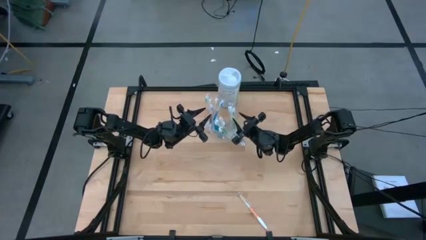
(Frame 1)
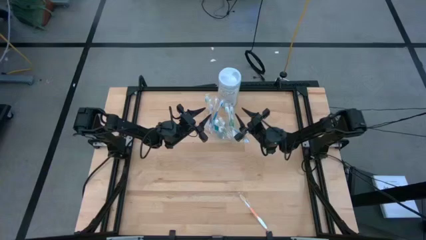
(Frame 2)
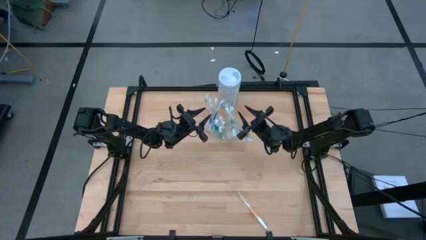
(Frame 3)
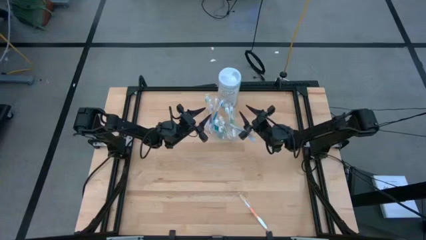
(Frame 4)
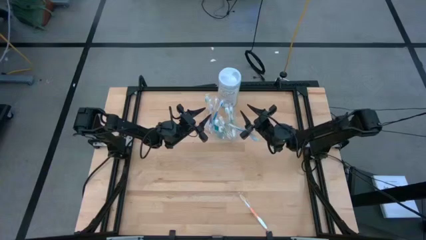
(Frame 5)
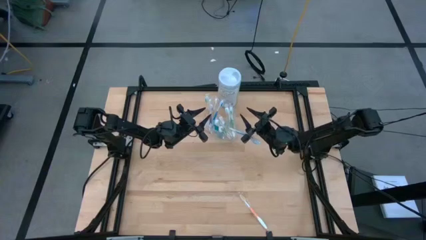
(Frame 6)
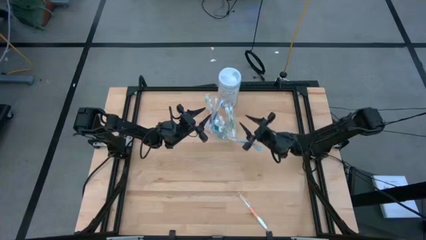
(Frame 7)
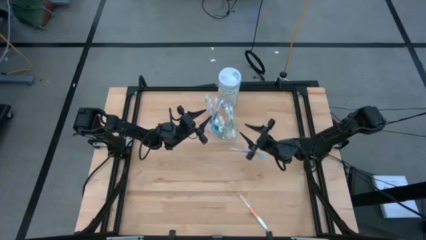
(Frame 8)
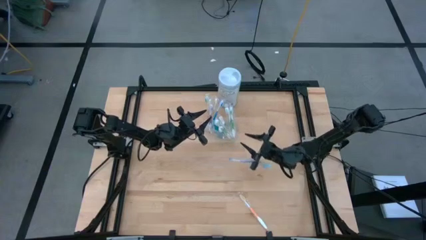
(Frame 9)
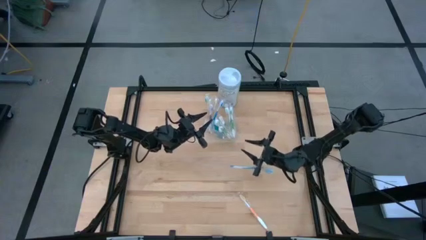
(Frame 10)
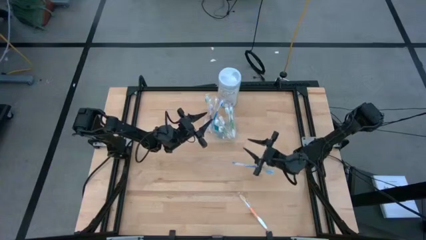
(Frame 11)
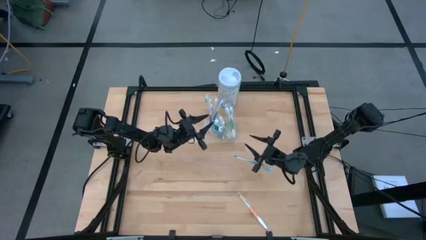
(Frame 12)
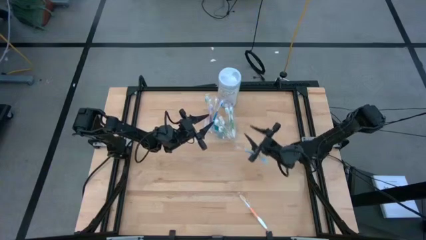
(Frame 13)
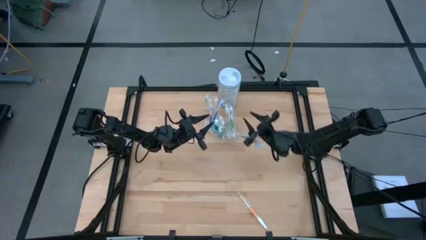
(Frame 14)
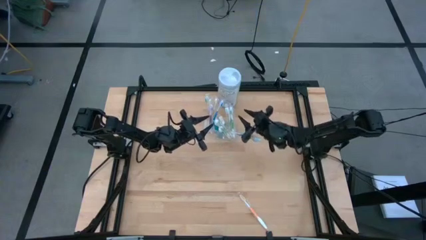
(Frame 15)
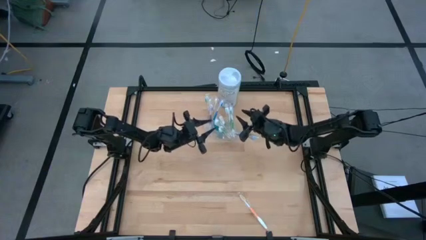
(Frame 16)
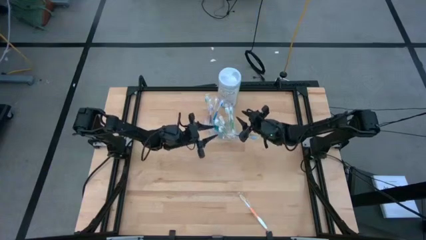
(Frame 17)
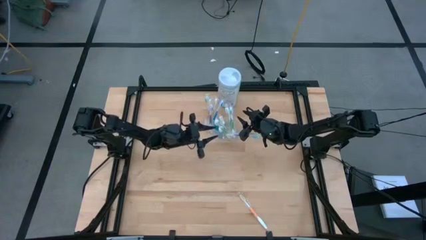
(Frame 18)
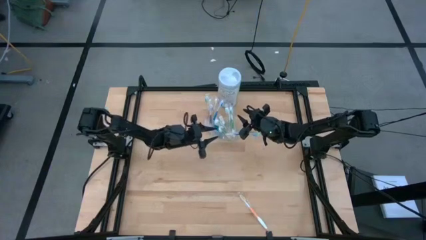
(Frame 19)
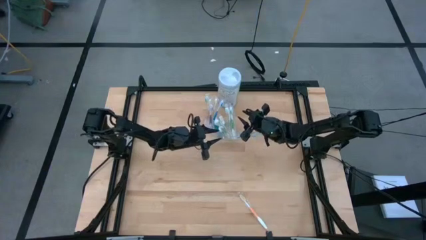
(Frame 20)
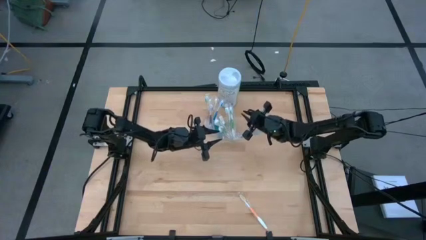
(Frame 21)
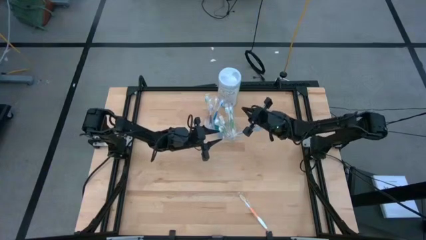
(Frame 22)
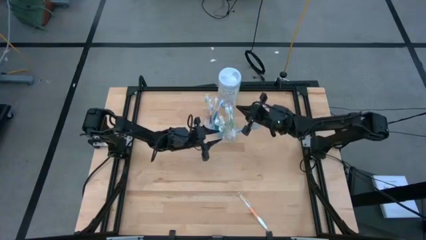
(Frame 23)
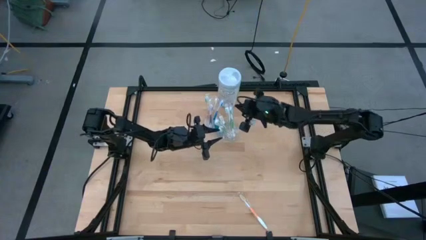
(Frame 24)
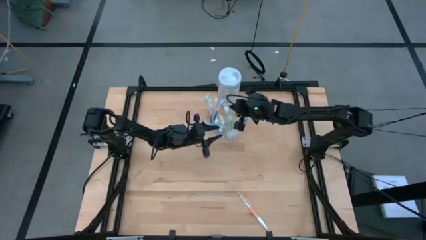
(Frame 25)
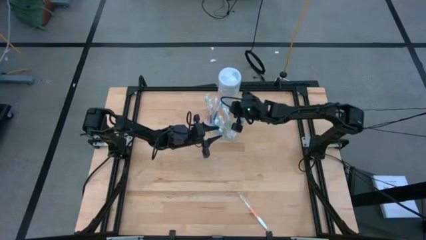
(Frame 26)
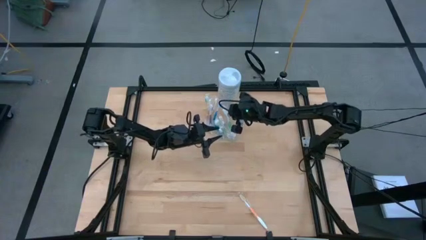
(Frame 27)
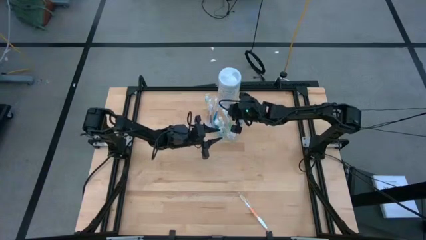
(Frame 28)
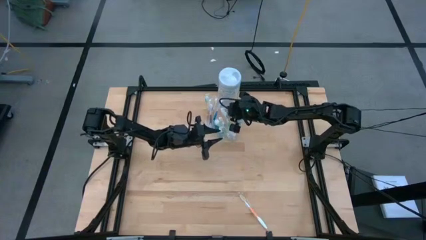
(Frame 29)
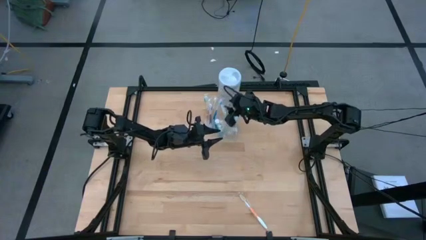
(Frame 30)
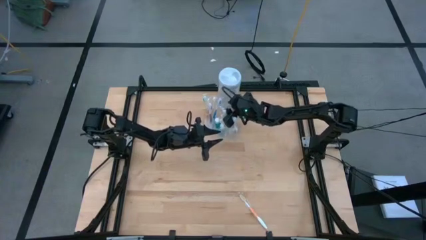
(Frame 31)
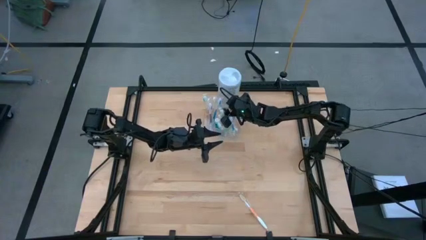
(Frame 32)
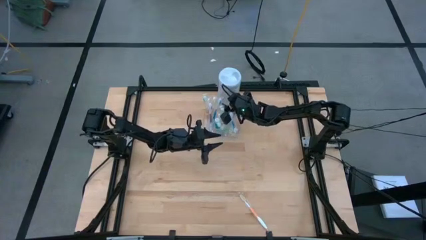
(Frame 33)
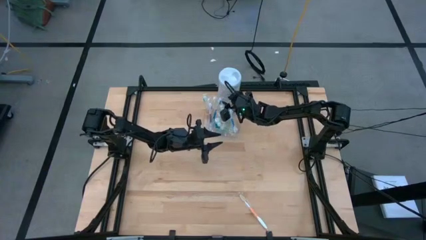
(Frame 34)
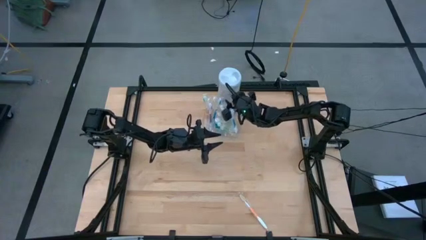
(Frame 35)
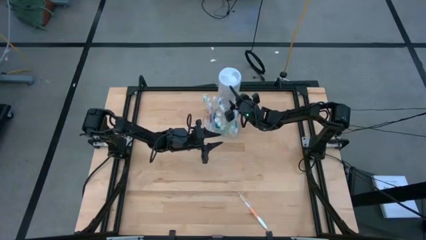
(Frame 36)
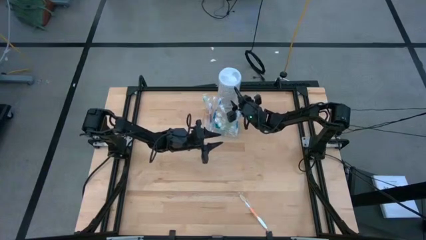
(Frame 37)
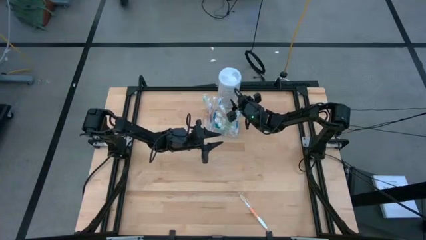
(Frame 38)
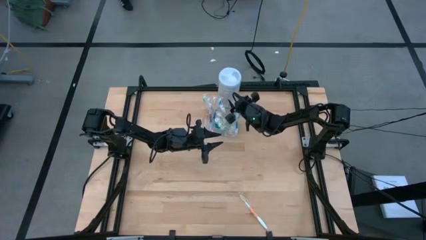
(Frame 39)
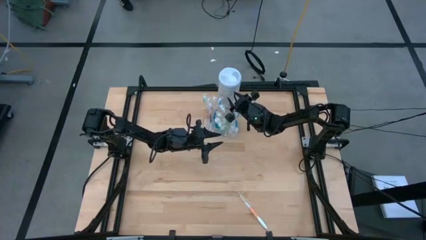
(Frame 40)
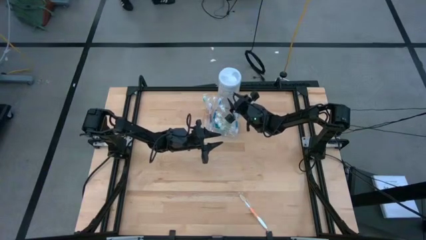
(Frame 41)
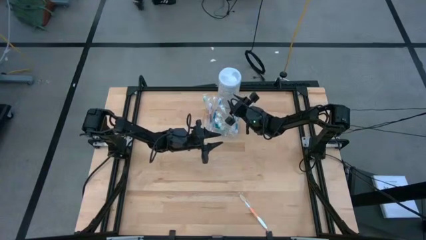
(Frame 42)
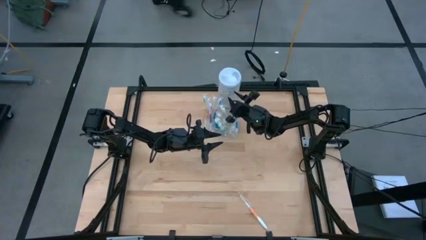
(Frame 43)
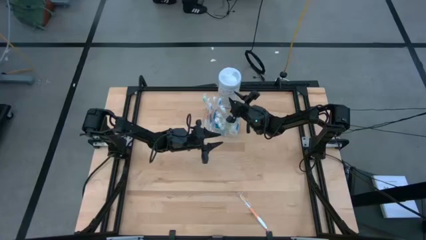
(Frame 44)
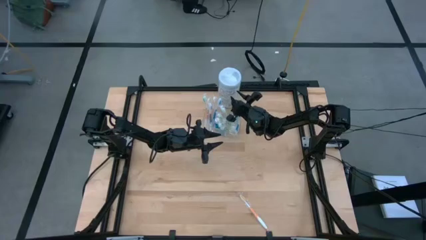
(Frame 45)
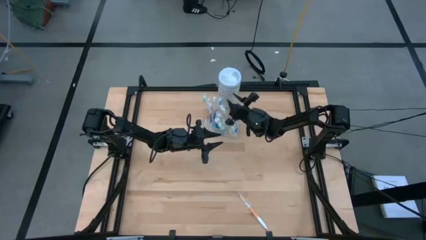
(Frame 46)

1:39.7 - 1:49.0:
Task: Pick & Place toothbrushing station
Put the blue toothbrush into the transparent organizer

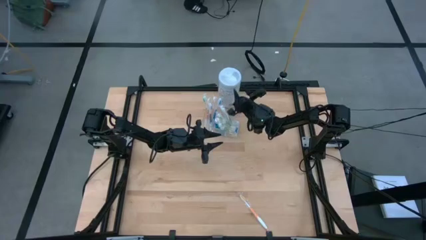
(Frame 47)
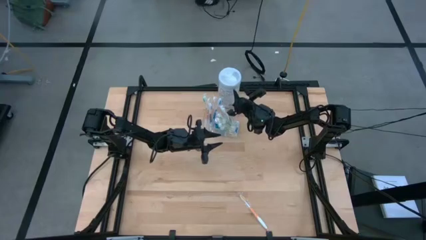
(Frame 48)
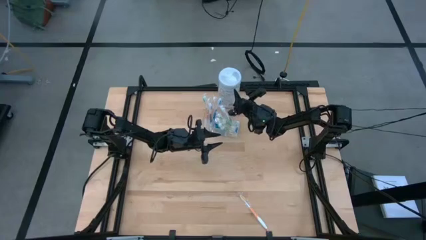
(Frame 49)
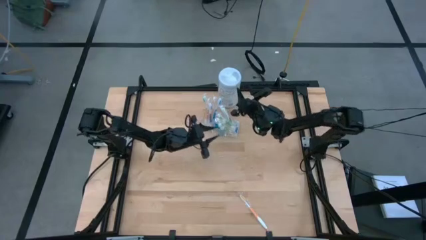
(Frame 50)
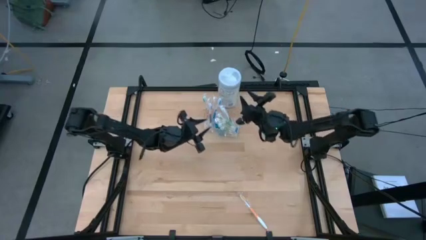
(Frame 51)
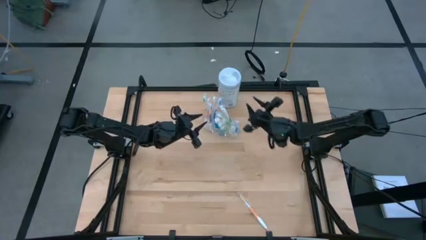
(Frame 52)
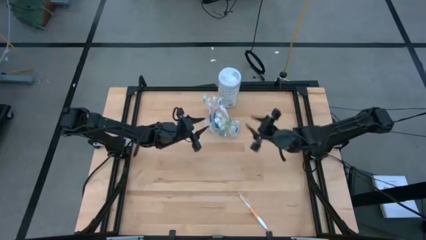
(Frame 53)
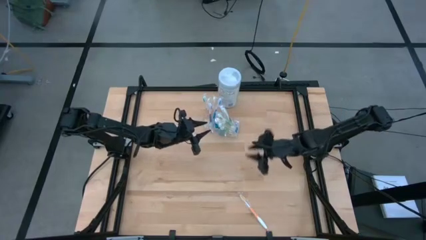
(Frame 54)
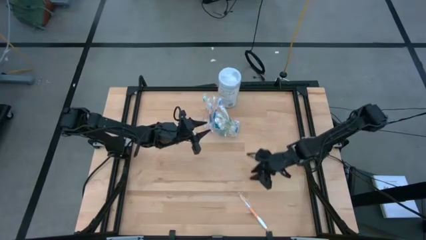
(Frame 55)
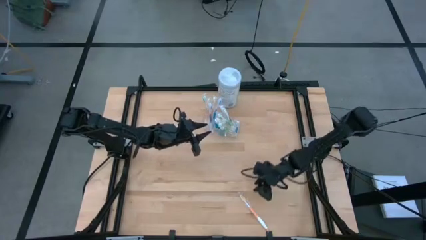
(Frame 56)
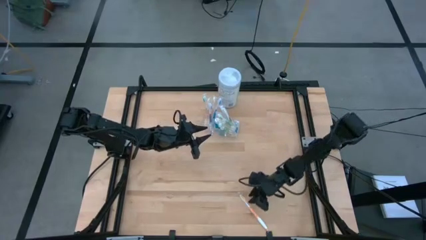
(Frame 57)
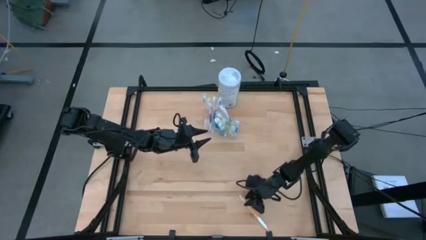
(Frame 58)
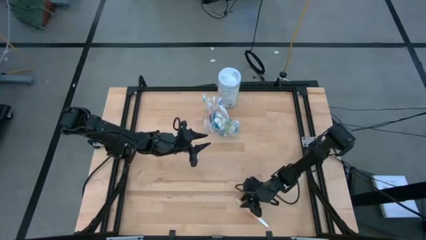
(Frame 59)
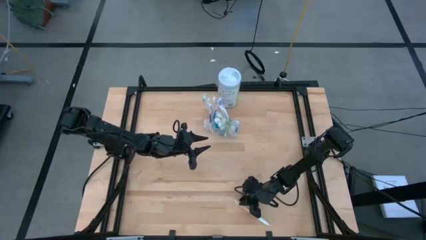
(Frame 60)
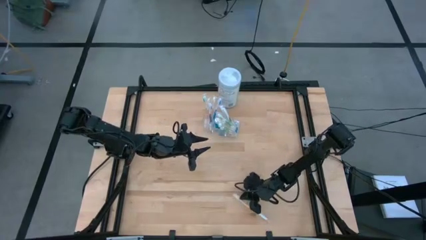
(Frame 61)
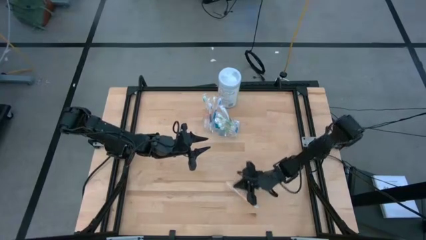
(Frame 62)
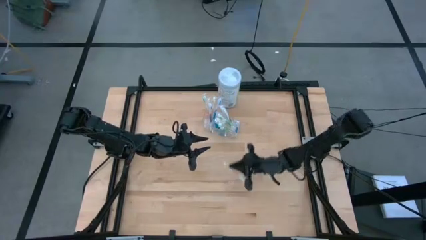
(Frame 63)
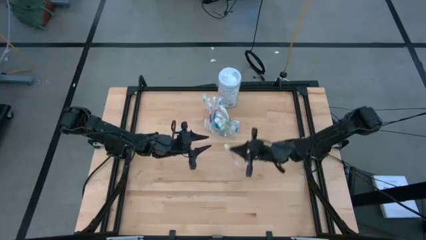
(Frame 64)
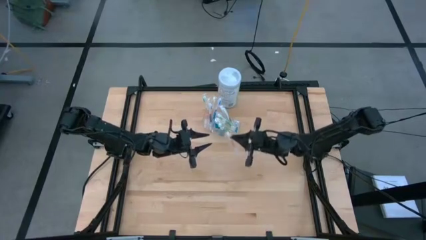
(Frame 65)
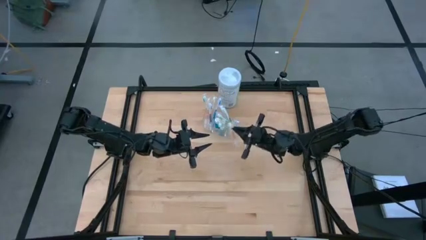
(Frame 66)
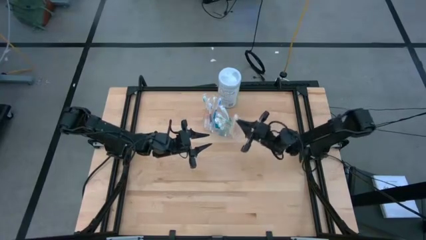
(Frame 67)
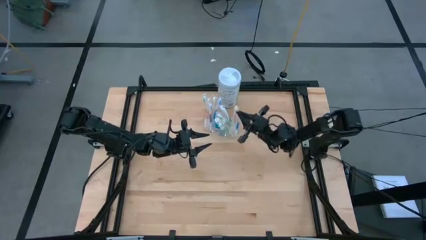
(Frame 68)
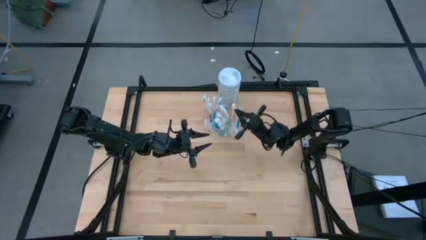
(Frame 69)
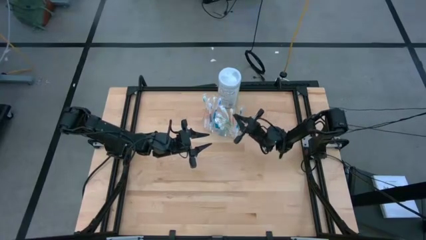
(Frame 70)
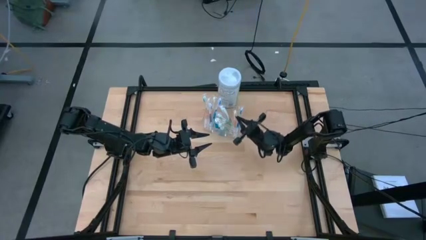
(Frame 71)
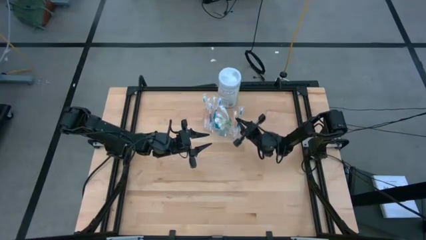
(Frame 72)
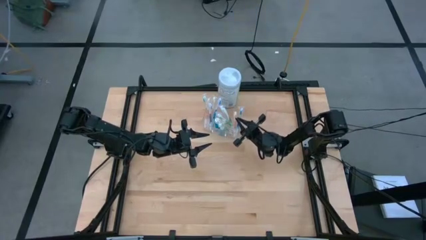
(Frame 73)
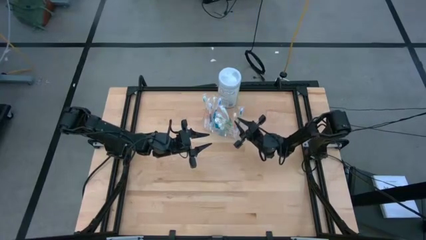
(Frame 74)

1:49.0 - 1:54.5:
Put the orange toothbrush into the transparent organizer
